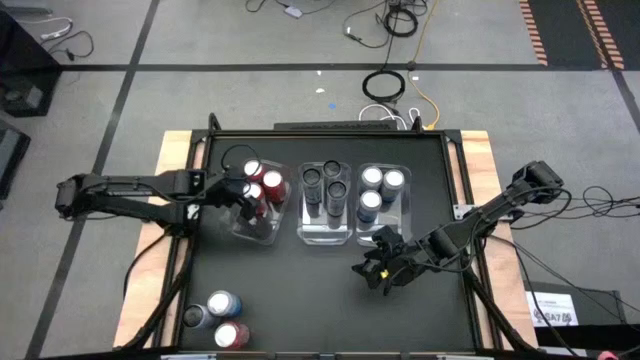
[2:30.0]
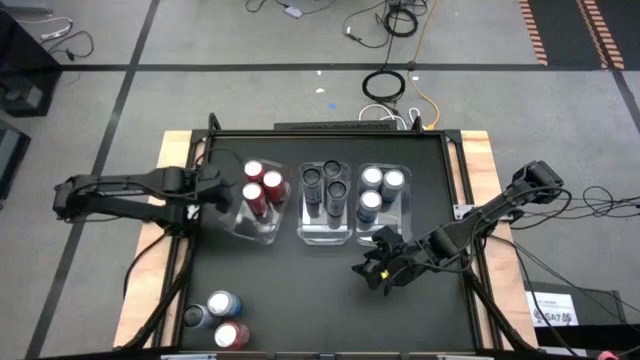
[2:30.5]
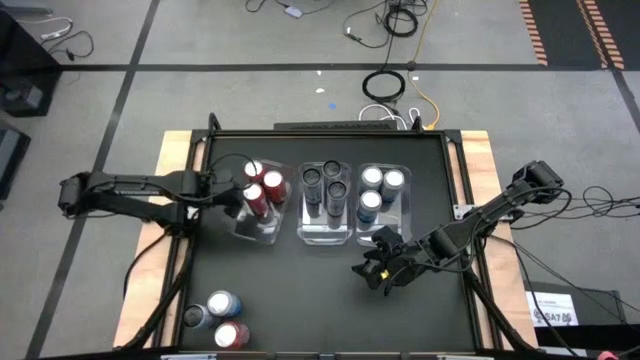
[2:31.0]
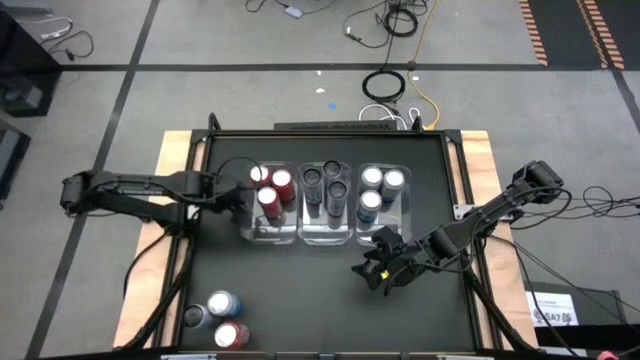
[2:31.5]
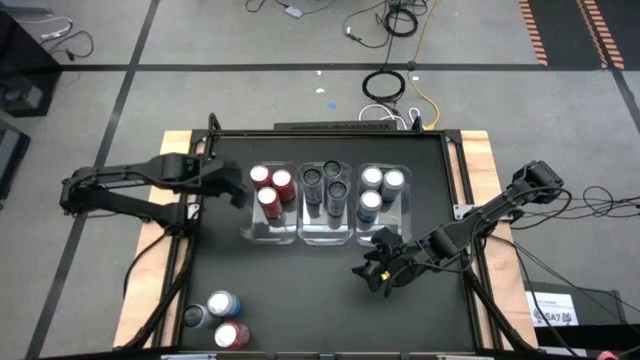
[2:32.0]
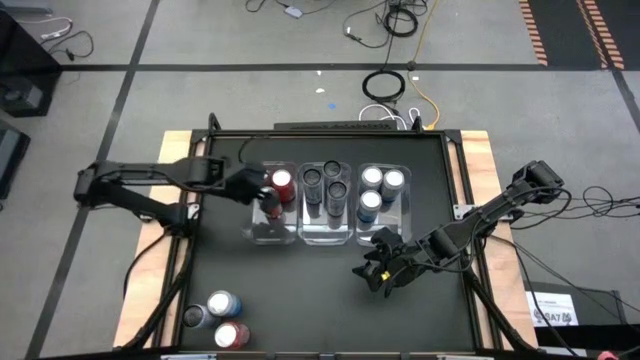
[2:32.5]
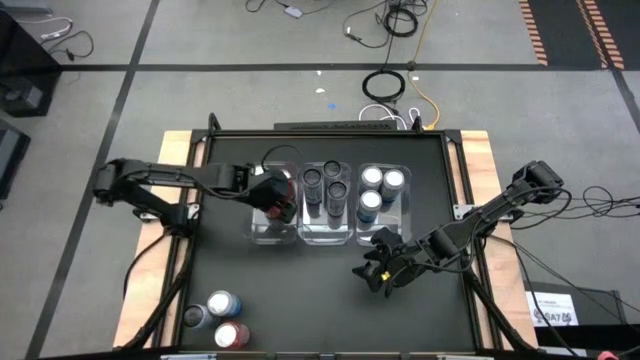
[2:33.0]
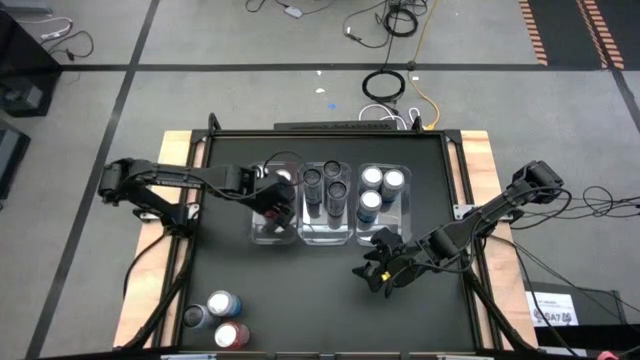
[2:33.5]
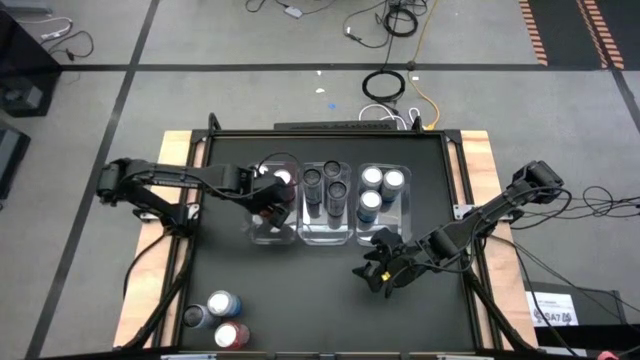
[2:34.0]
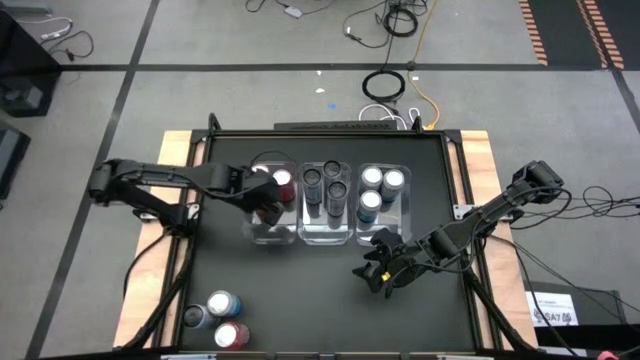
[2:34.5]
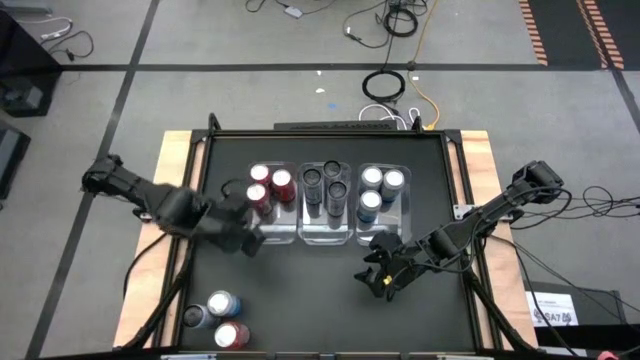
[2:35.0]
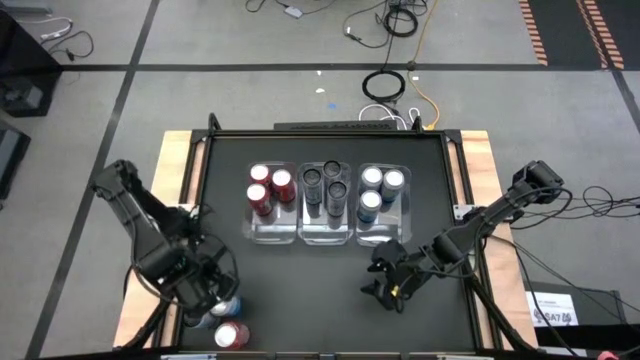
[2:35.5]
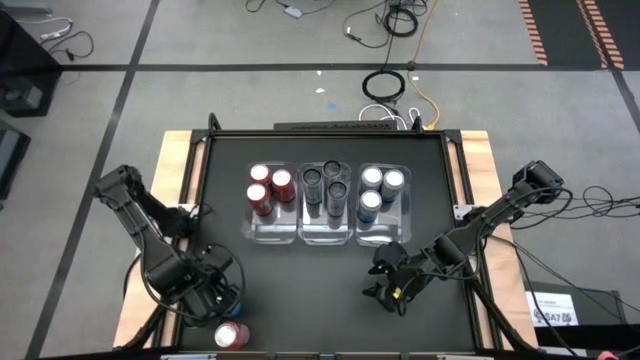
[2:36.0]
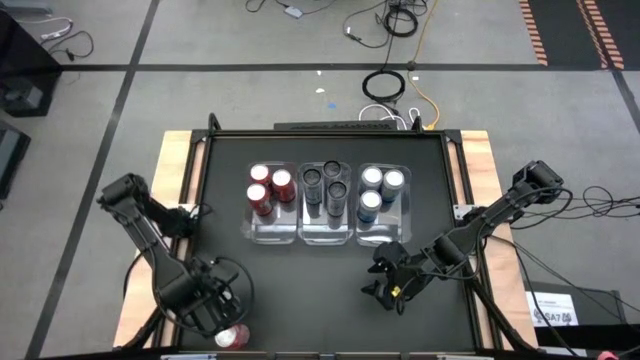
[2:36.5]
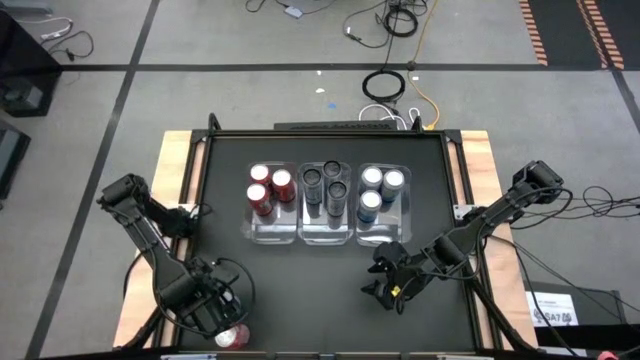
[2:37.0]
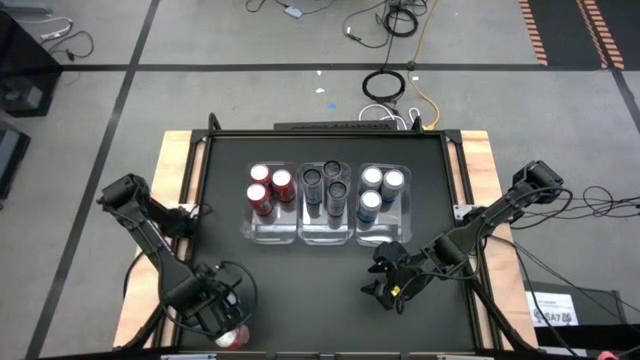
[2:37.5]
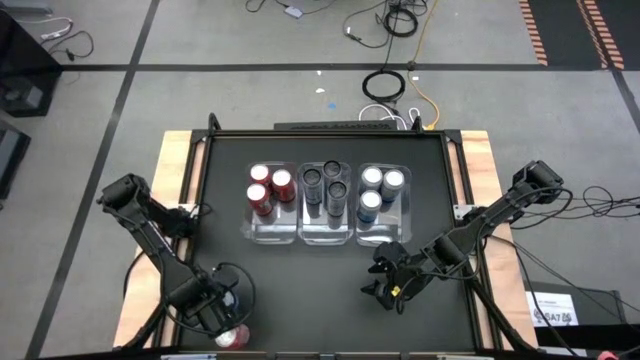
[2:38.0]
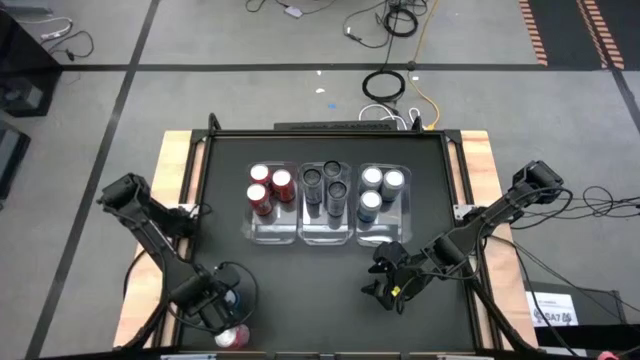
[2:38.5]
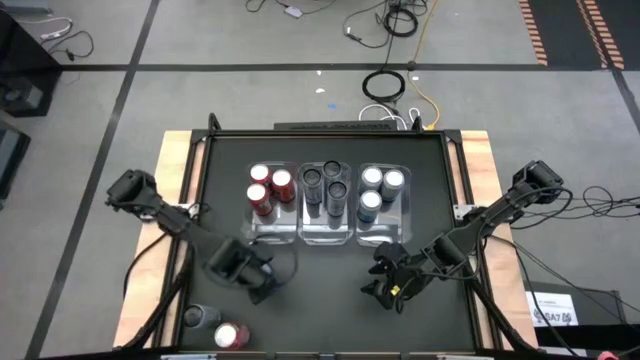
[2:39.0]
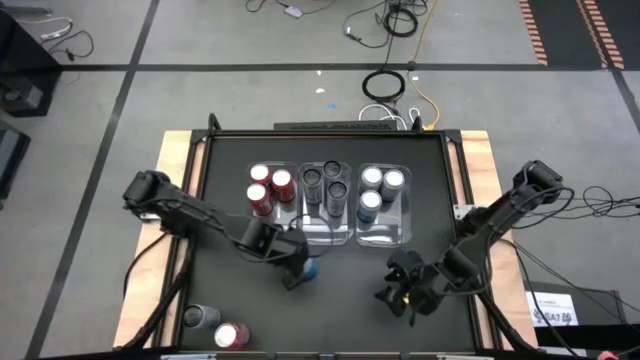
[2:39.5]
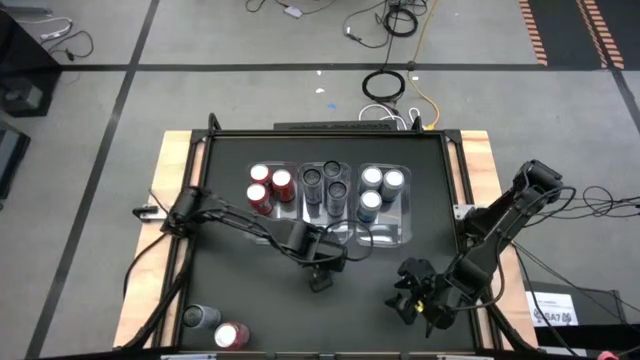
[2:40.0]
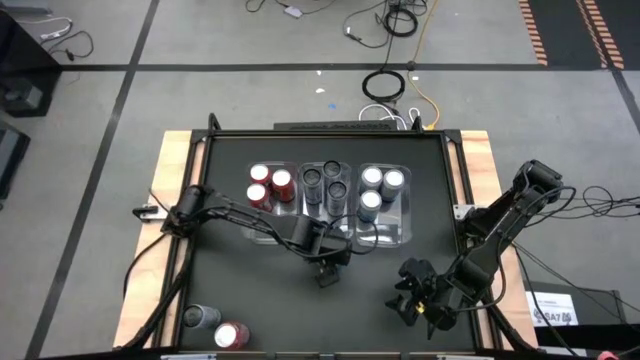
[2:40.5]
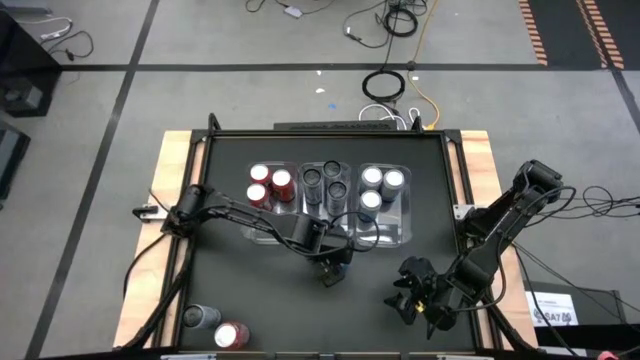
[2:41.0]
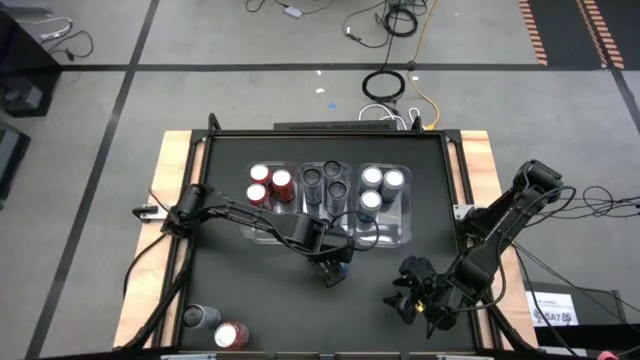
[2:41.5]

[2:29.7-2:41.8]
Task: Sort soda cans
Put the blue-white soda can into the middle right transparent bin

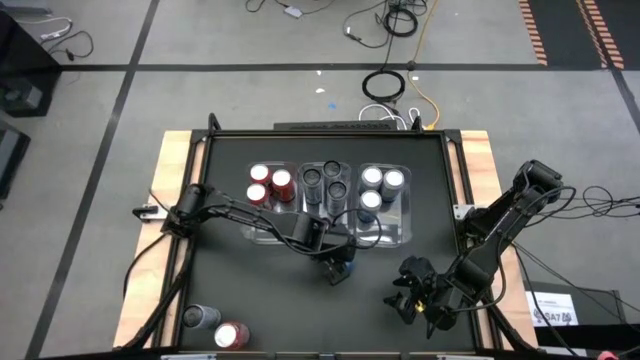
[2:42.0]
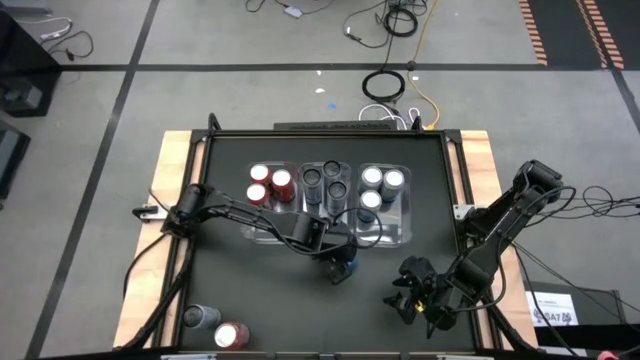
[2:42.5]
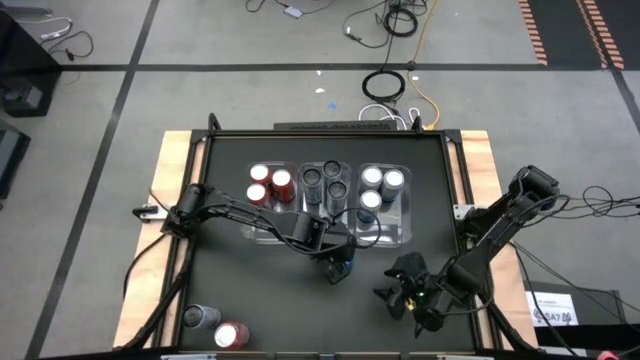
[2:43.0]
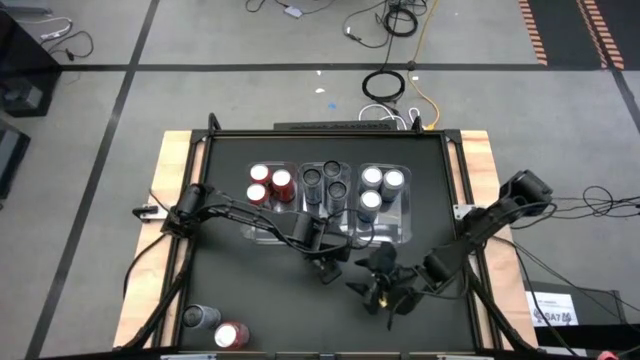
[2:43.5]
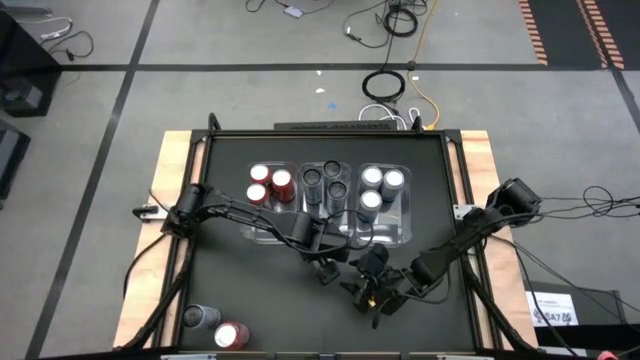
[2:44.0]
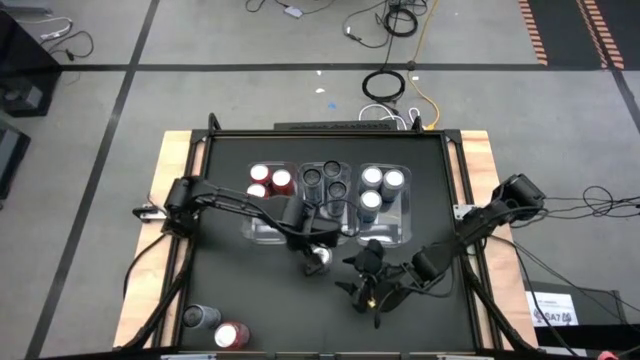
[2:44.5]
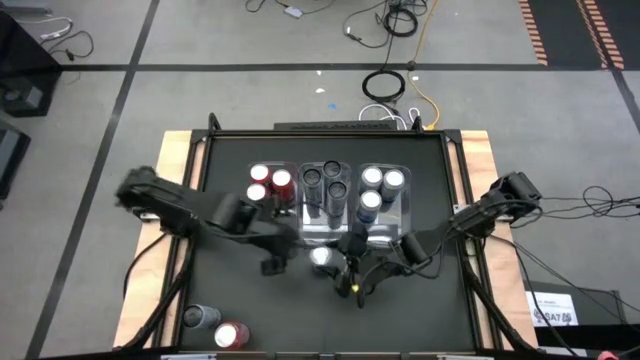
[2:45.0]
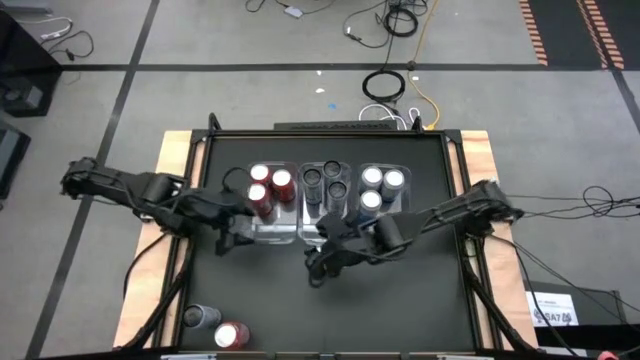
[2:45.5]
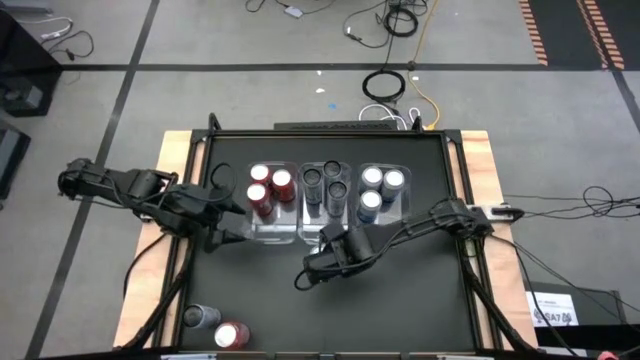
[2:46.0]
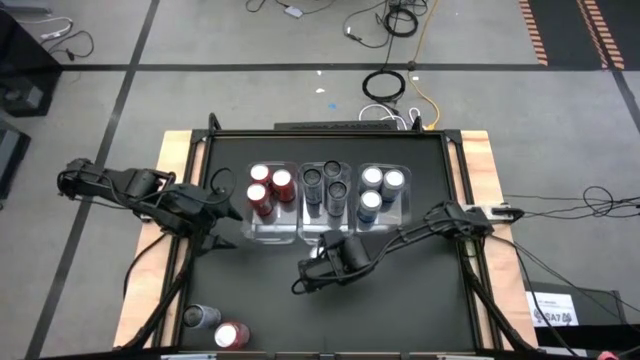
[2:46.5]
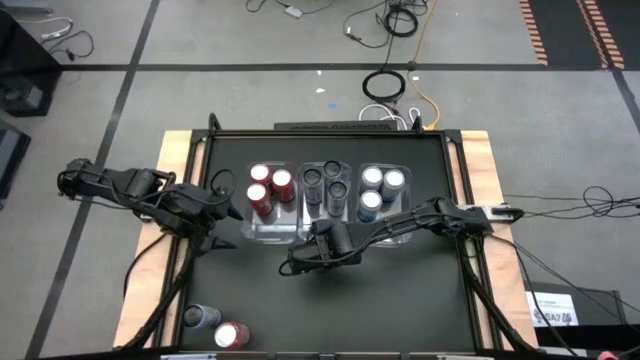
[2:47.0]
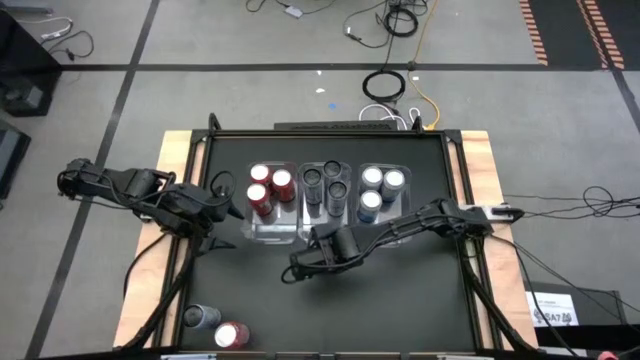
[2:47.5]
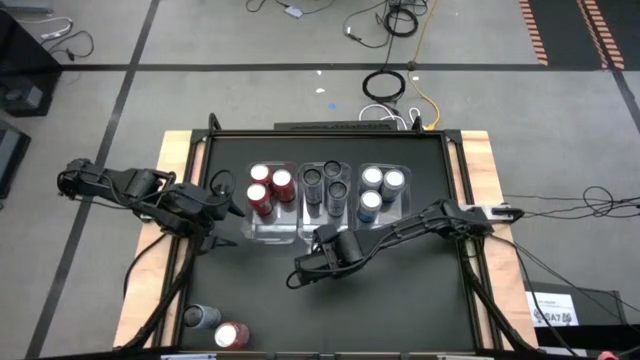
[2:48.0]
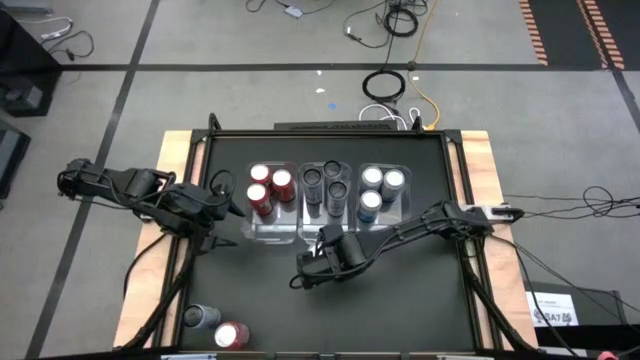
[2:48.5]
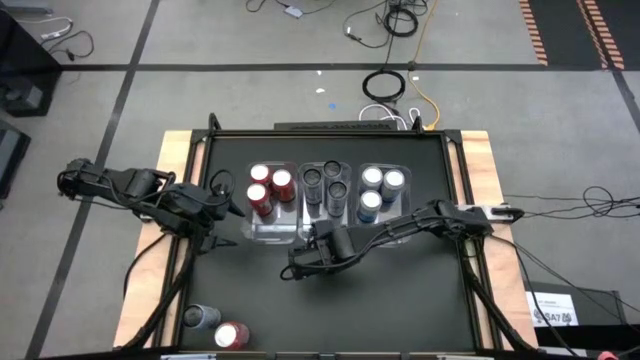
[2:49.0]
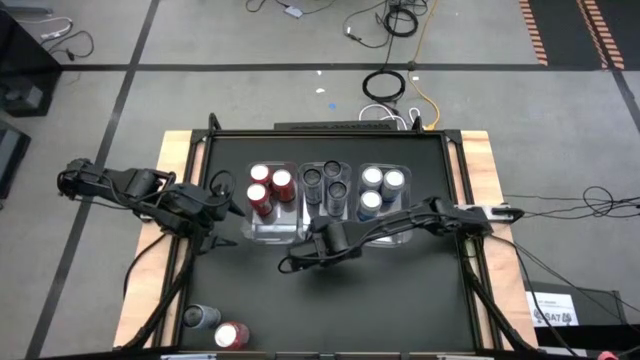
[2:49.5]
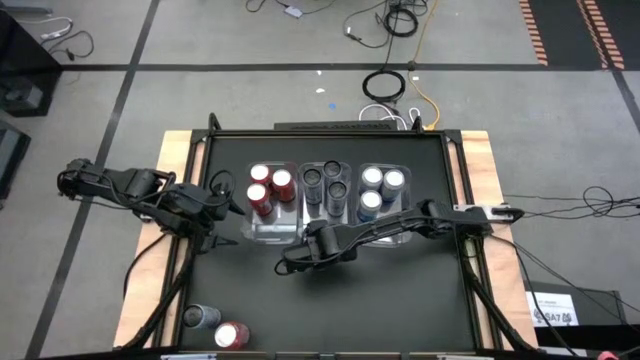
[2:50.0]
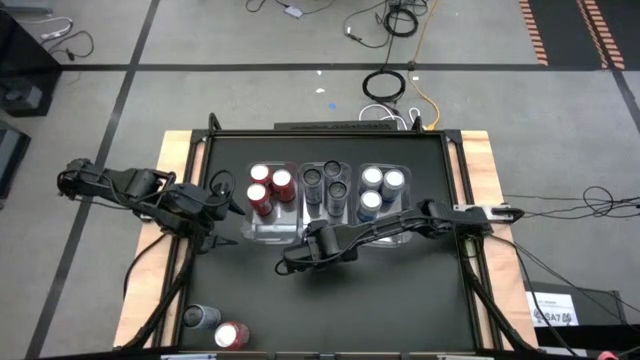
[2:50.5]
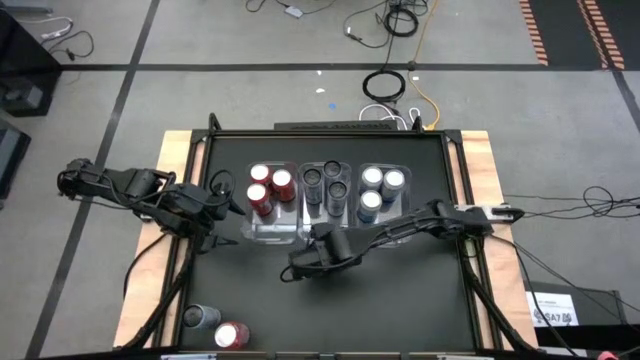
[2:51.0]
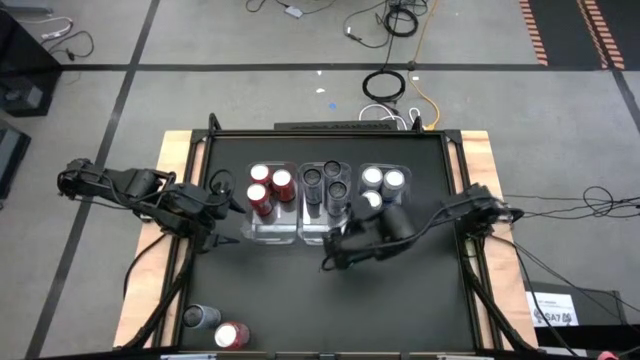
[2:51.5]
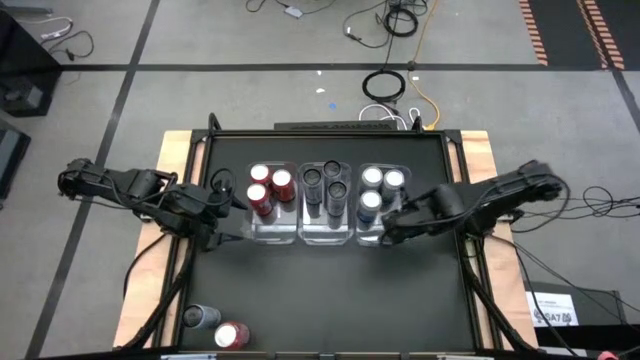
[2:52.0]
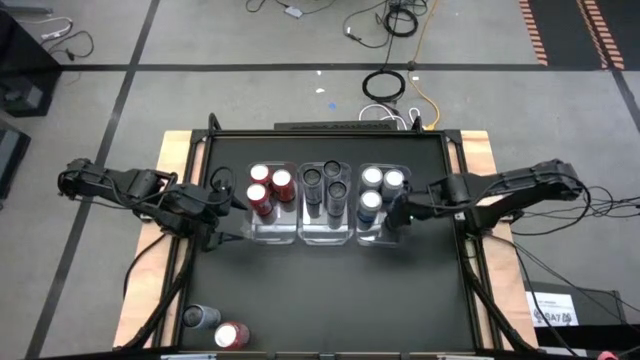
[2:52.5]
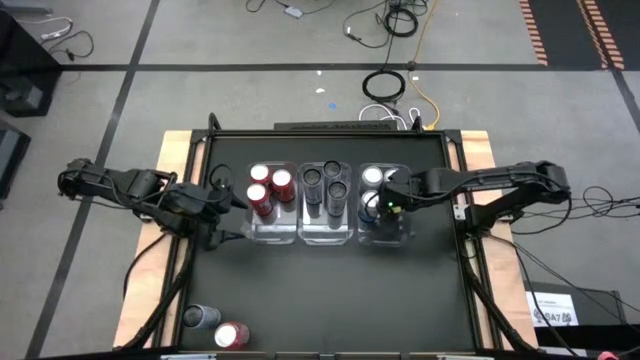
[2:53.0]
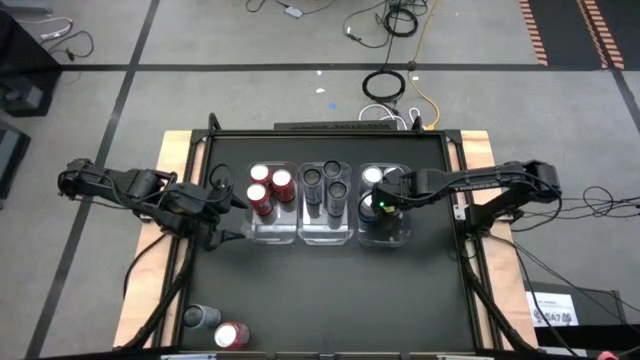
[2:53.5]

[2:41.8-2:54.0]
Put the blue-white soda can into the middle right transparent bin
